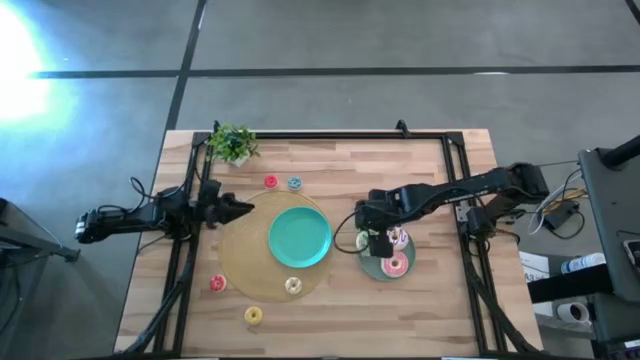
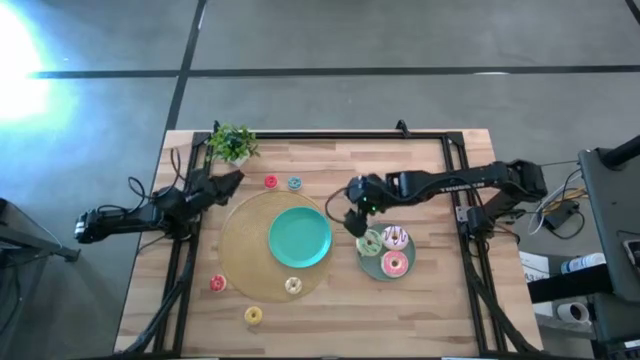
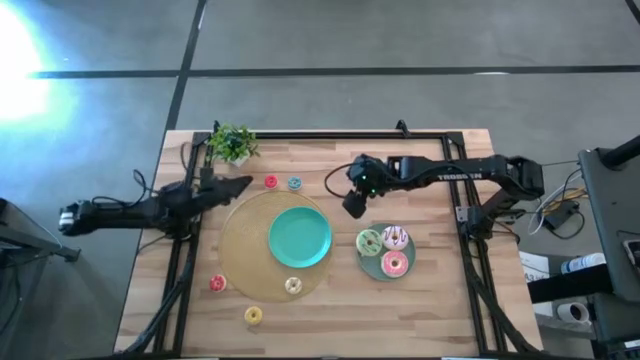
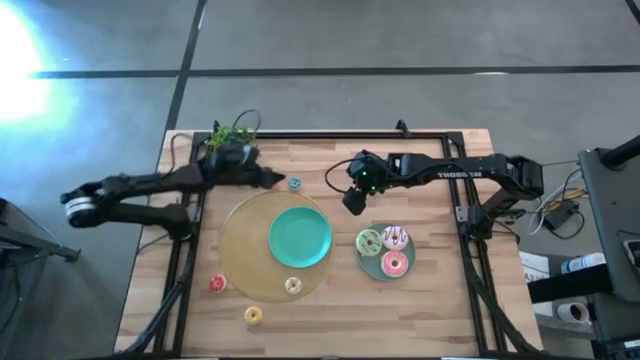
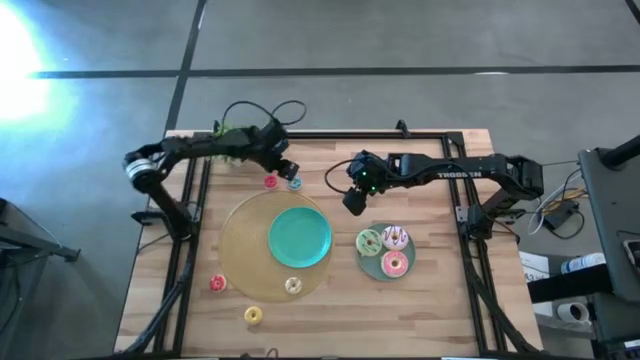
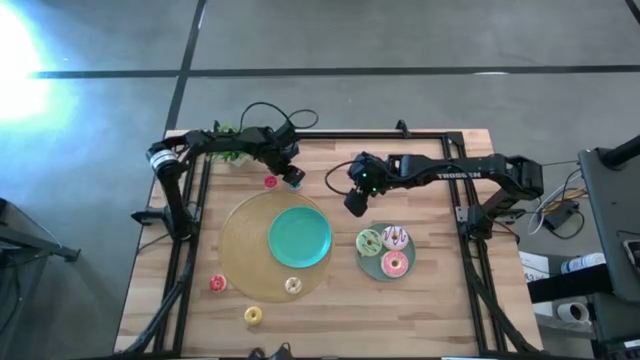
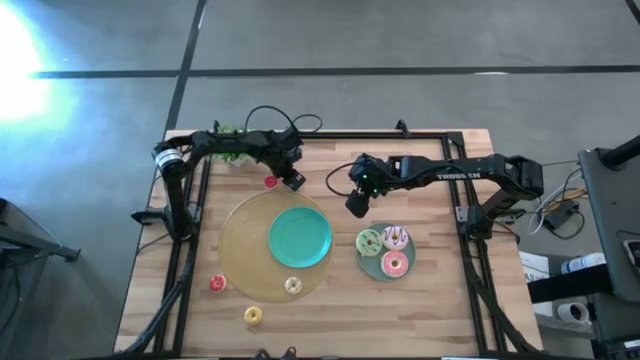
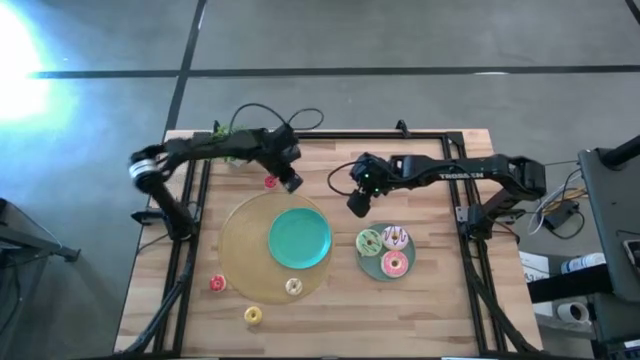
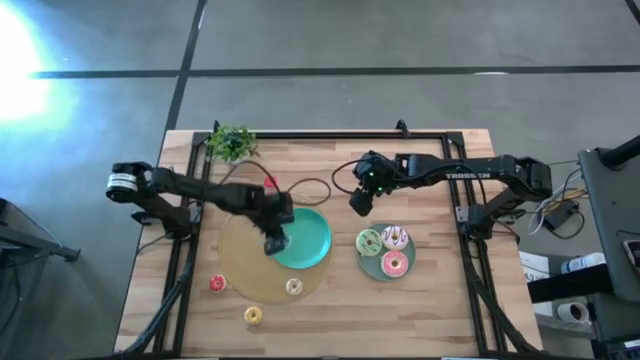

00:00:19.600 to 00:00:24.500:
Task: Pick & Place donuts
Put the small blue donut on the left plate

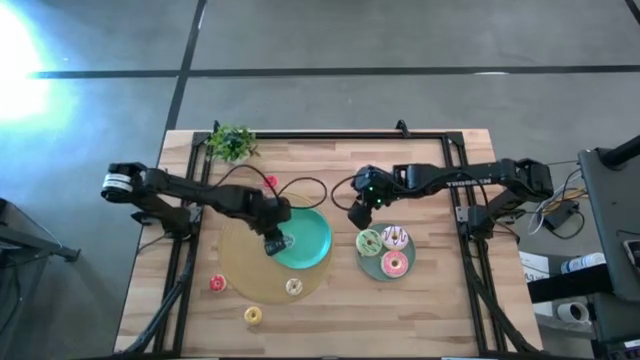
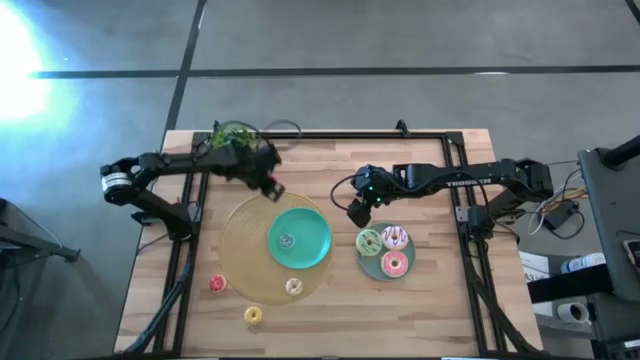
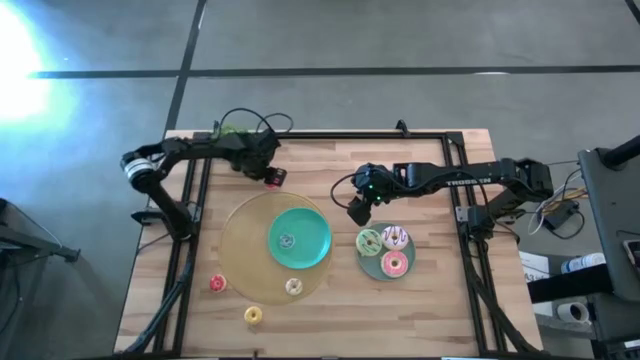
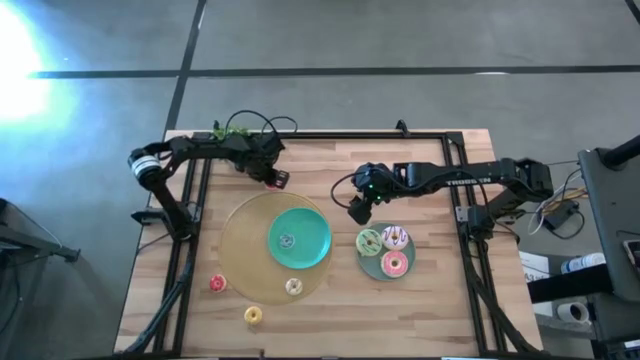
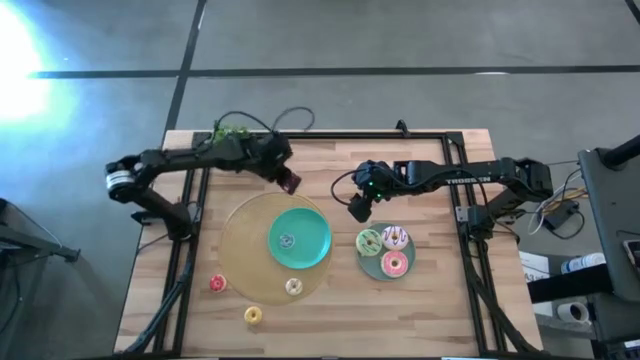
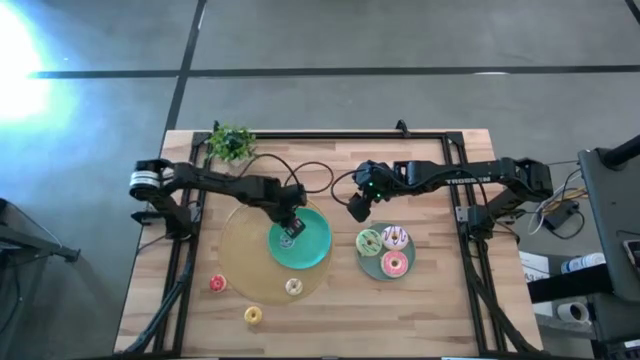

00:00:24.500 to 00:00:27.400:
Put the small red donut on the left plate

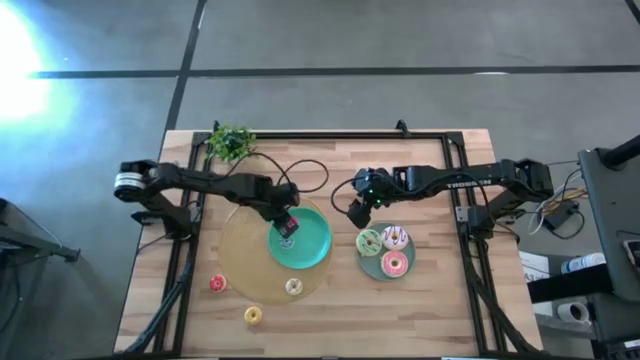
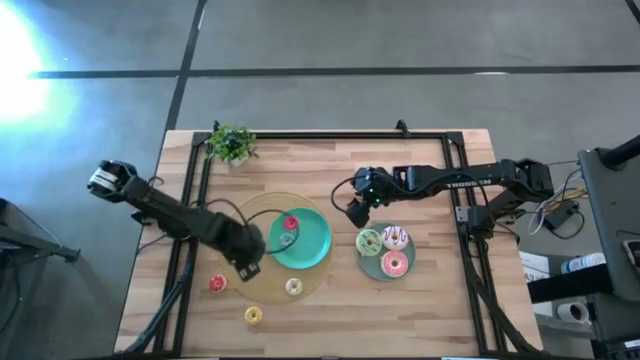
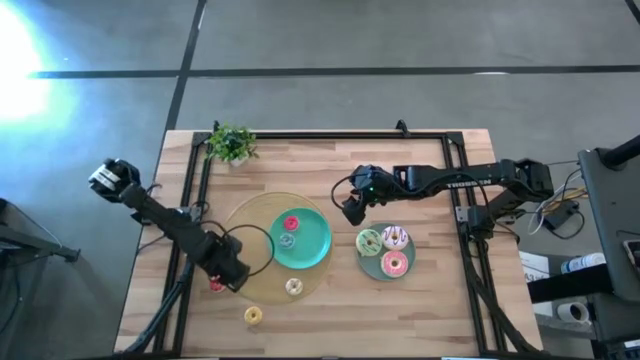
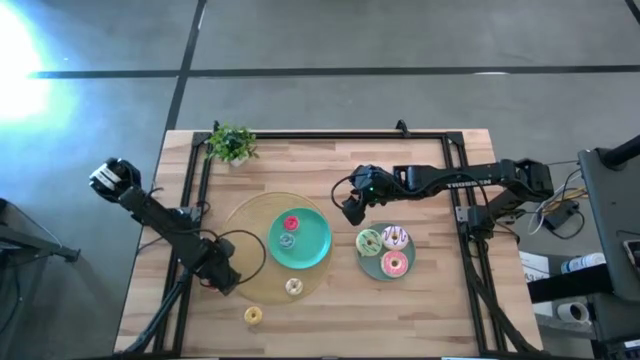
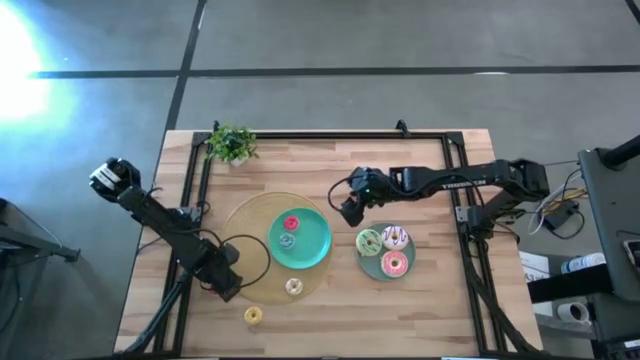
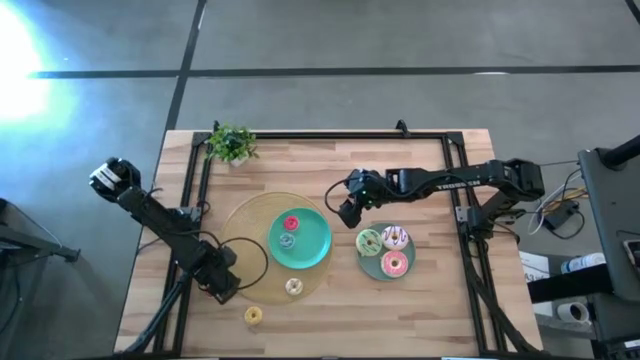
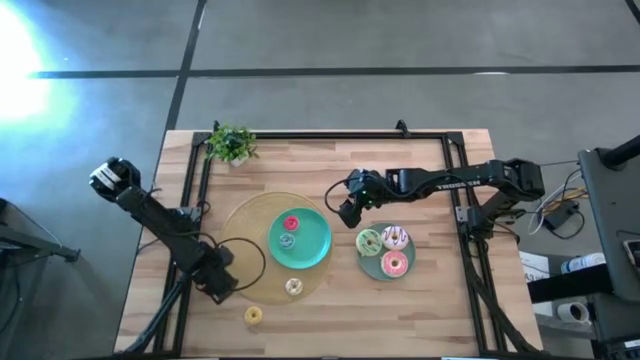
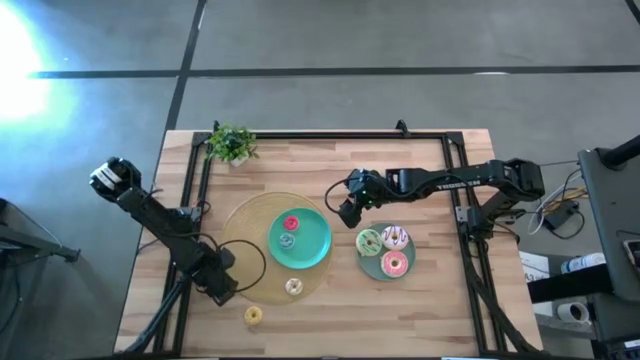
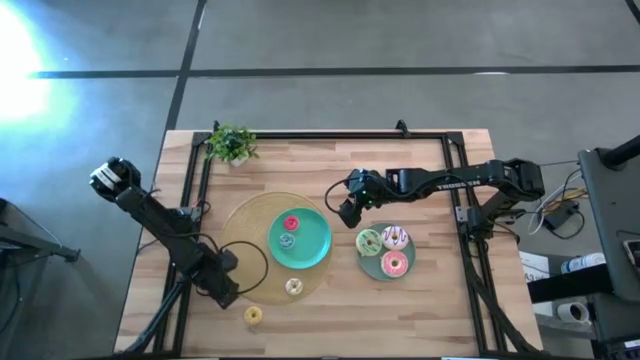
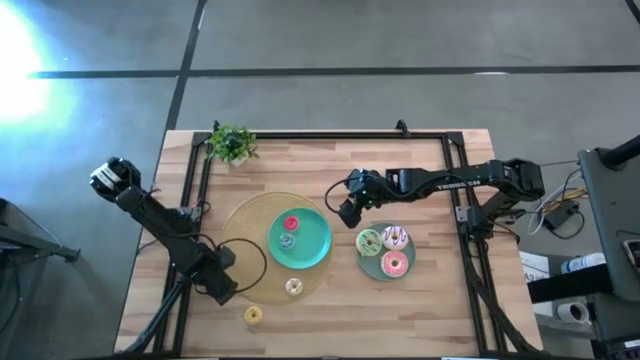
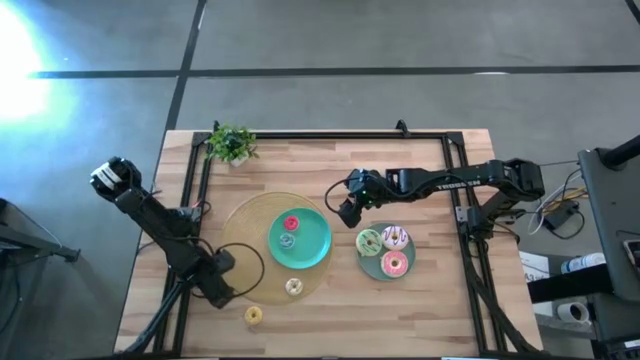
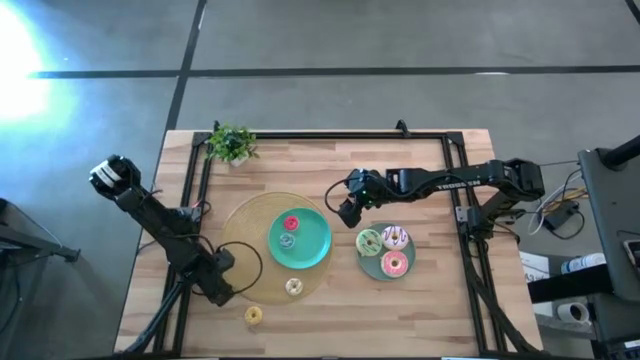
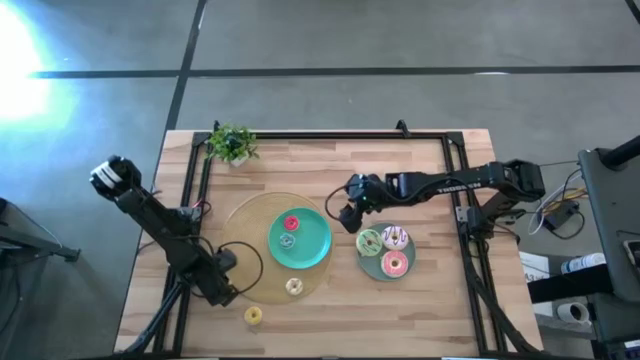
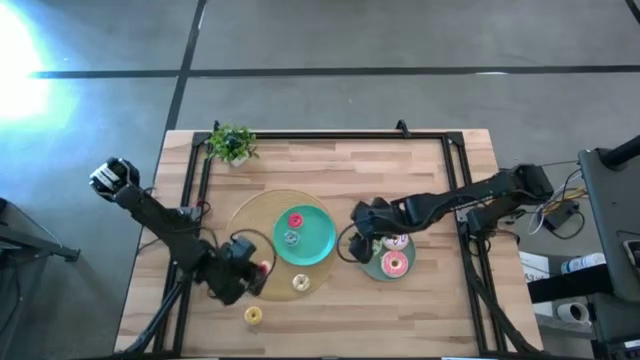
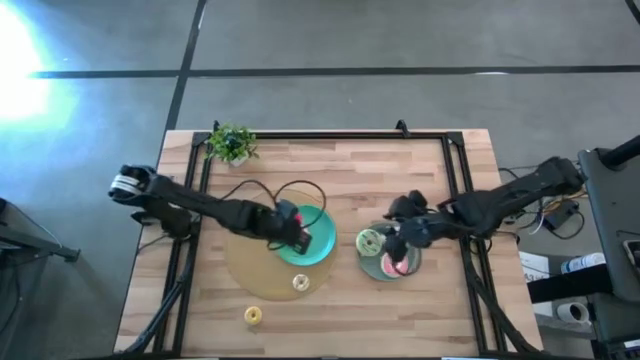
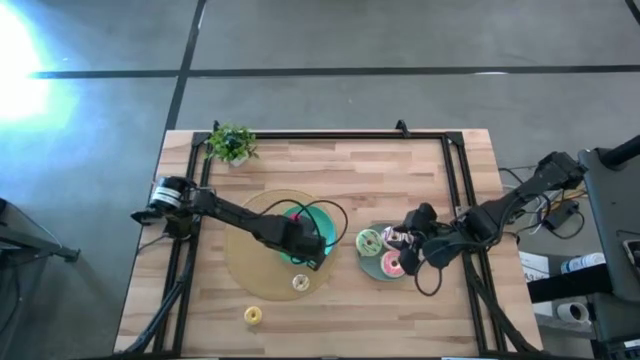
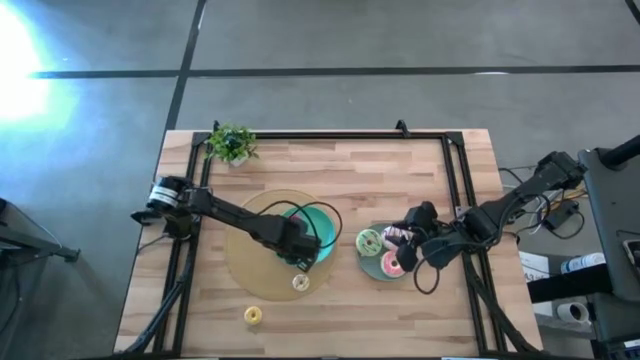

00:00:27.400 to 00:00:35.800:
Put the small orange donut on the left plate

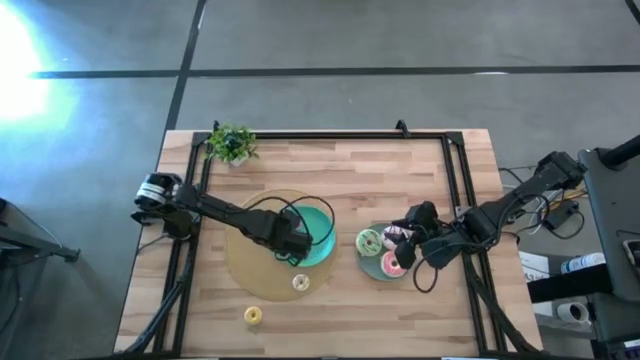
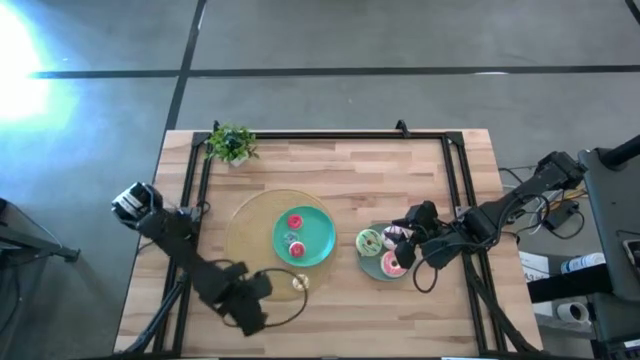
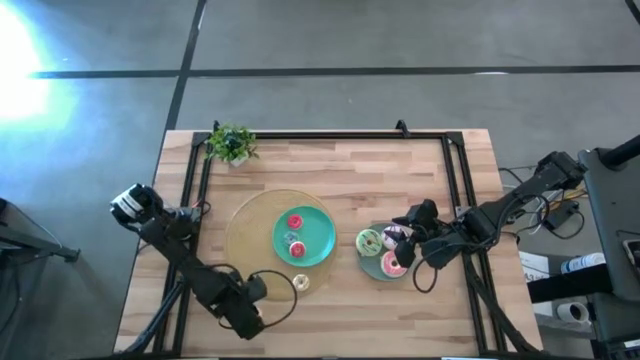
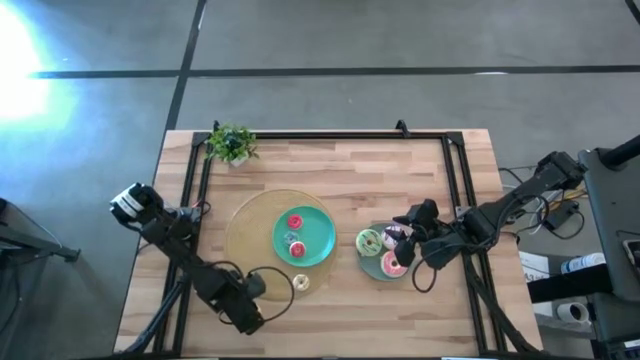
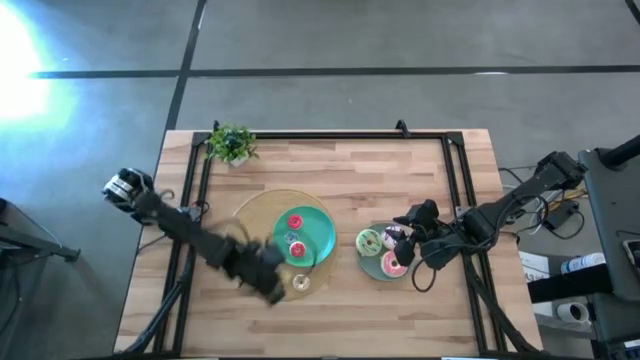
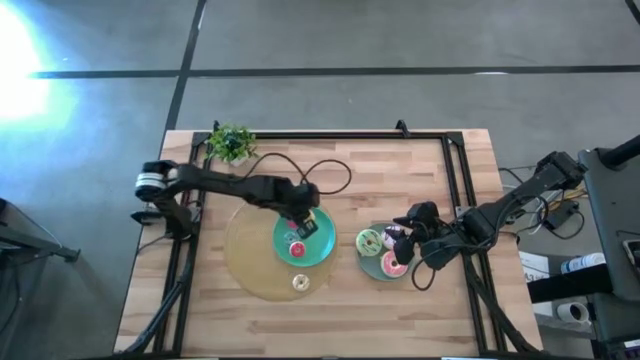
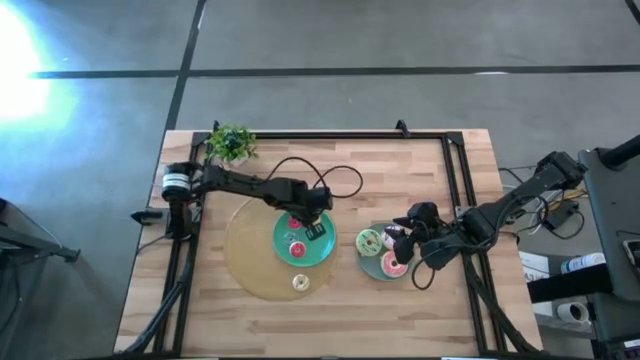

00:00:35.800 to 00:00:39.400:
Put the small yellow donut on the left plate

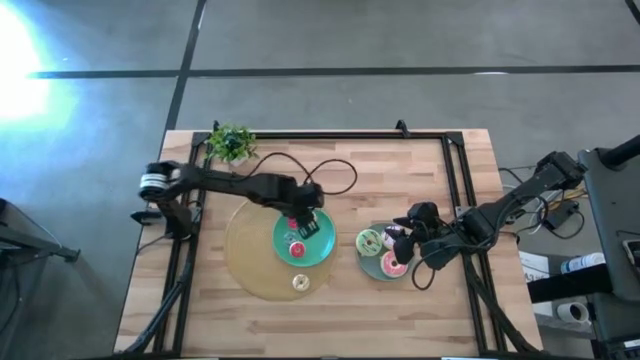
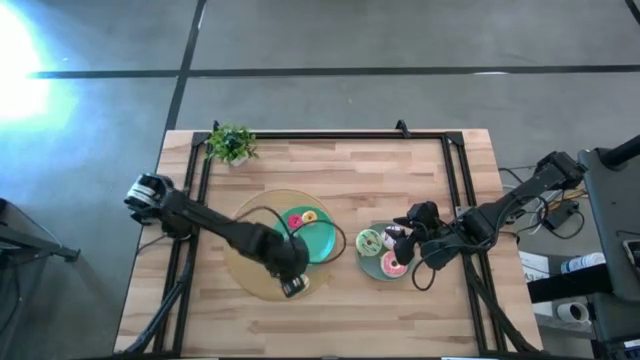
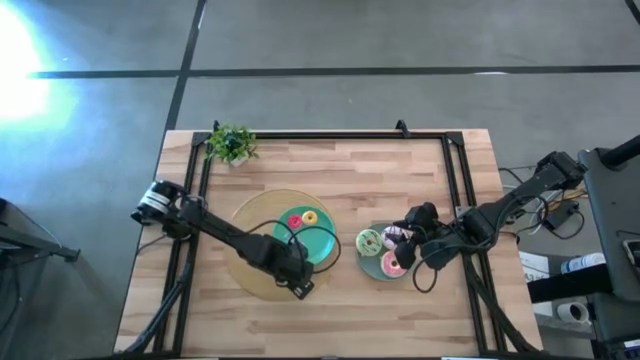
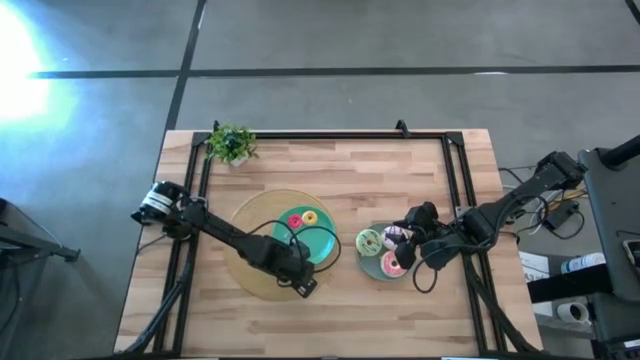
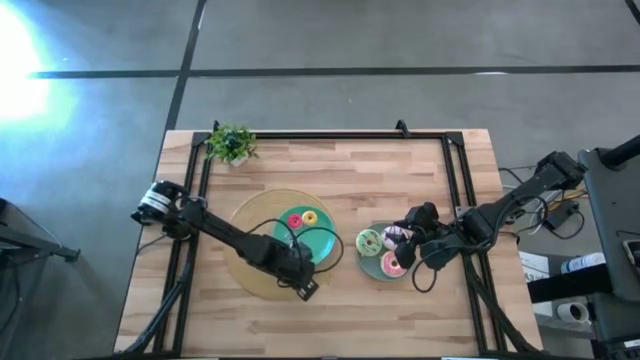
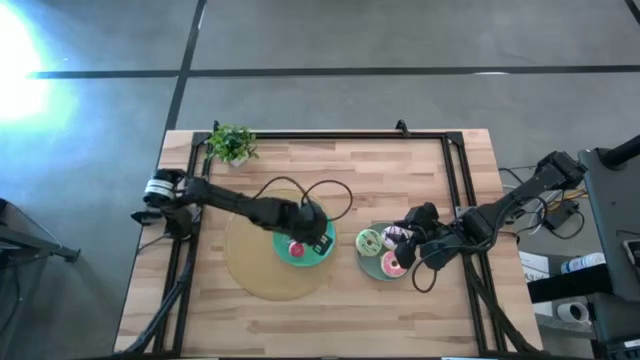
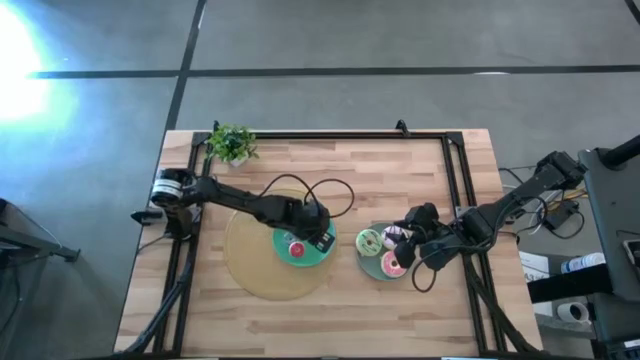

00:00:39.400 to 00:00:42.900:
Put the small white donut on the left plate
